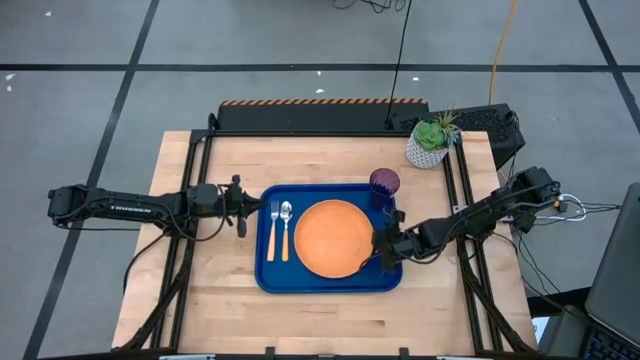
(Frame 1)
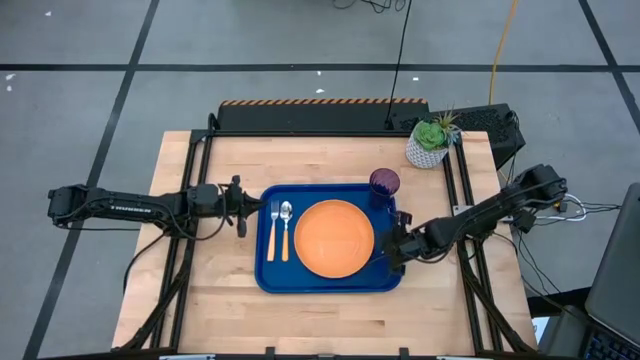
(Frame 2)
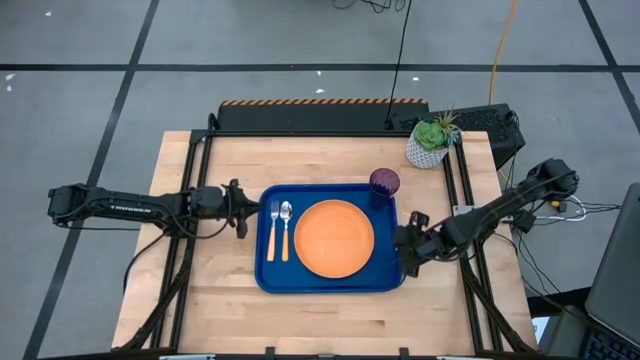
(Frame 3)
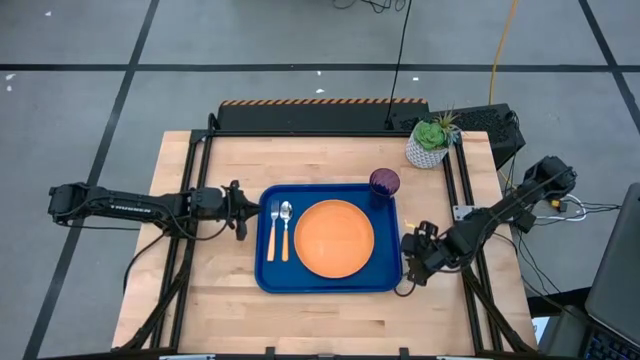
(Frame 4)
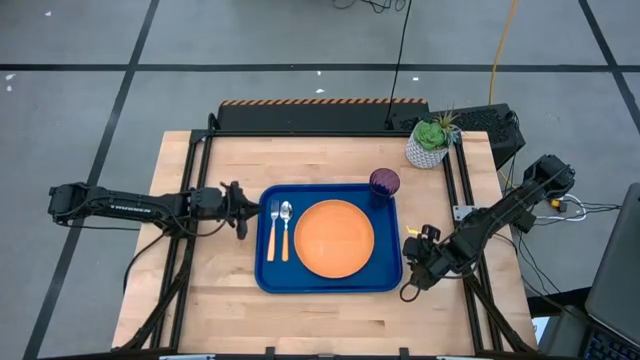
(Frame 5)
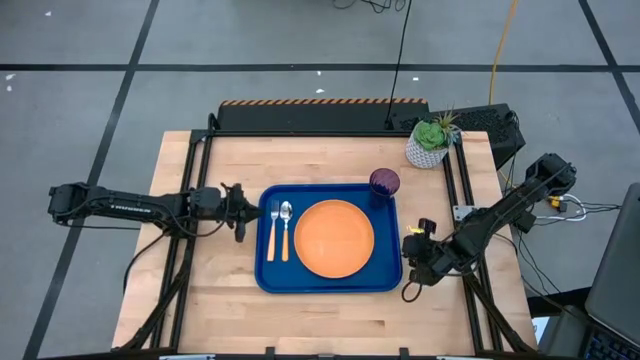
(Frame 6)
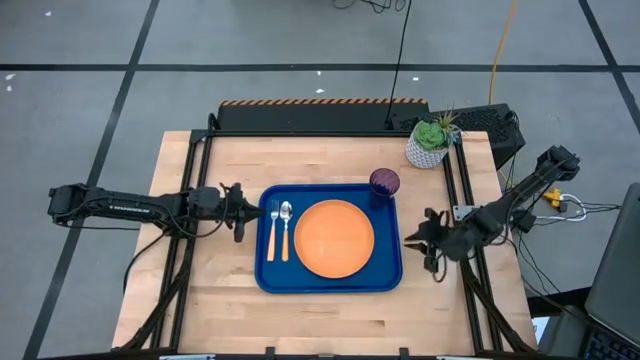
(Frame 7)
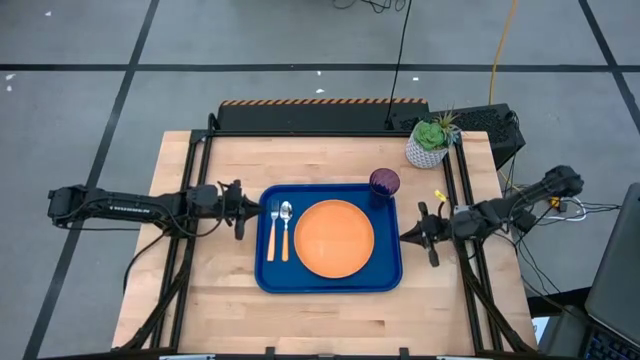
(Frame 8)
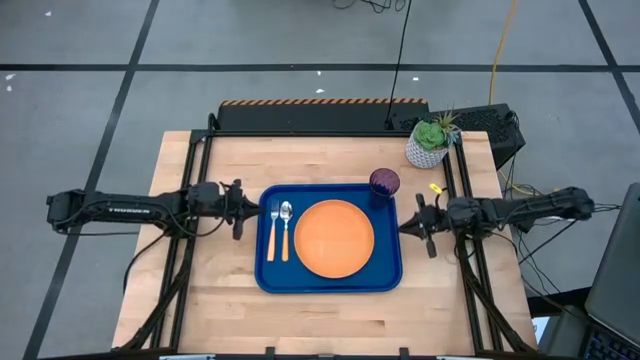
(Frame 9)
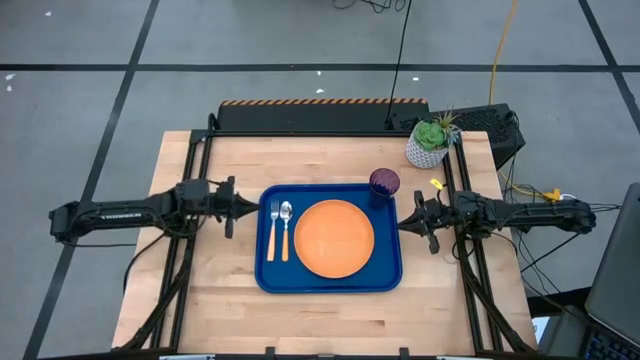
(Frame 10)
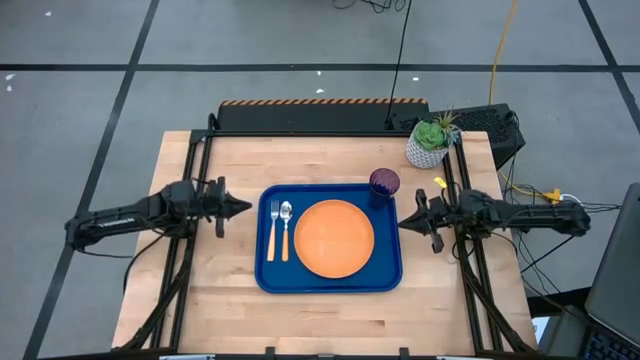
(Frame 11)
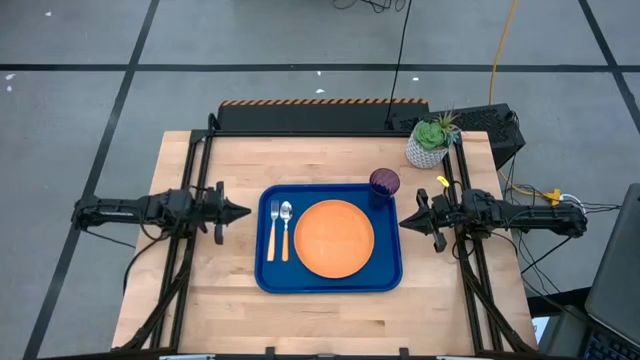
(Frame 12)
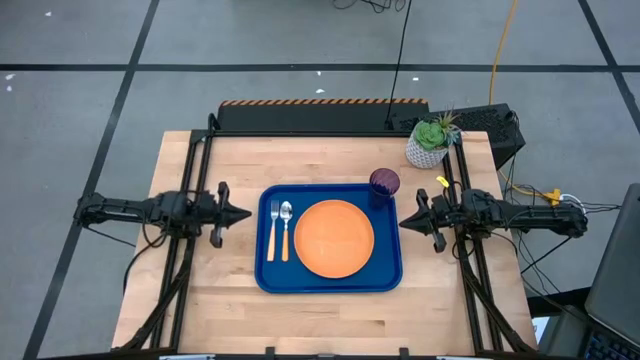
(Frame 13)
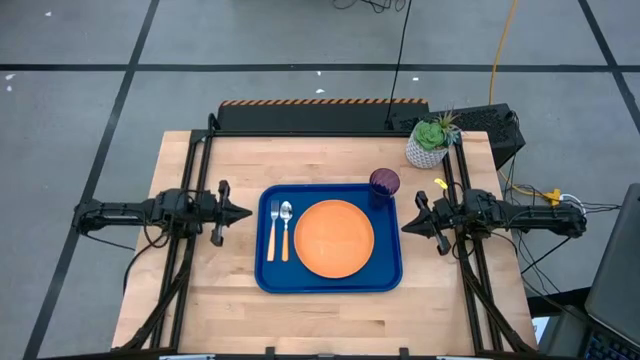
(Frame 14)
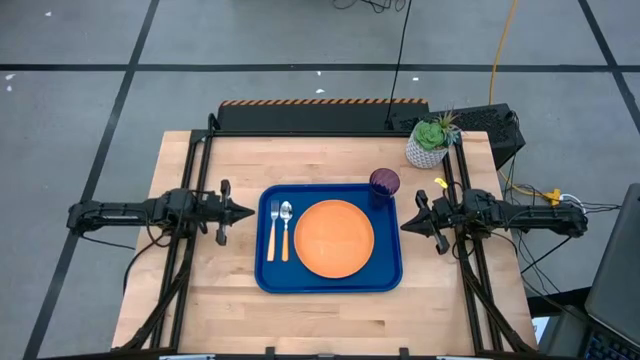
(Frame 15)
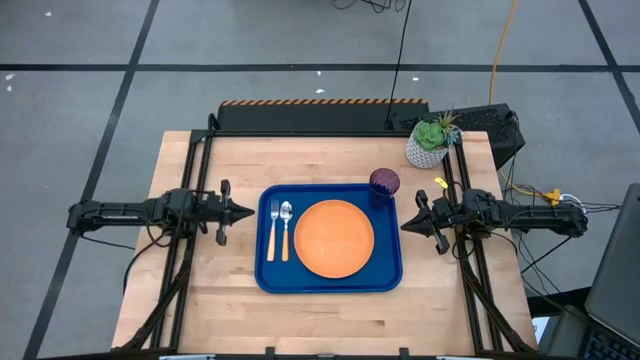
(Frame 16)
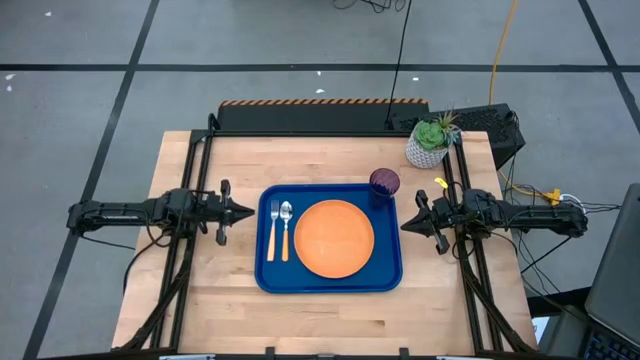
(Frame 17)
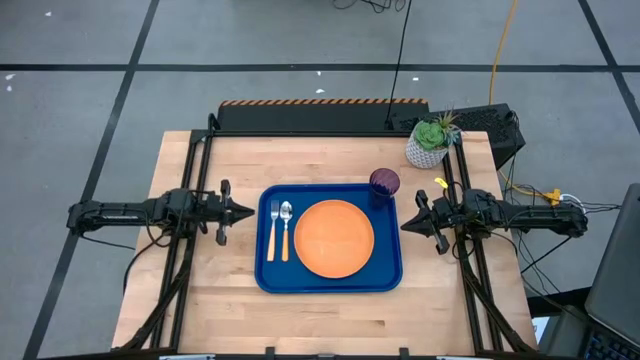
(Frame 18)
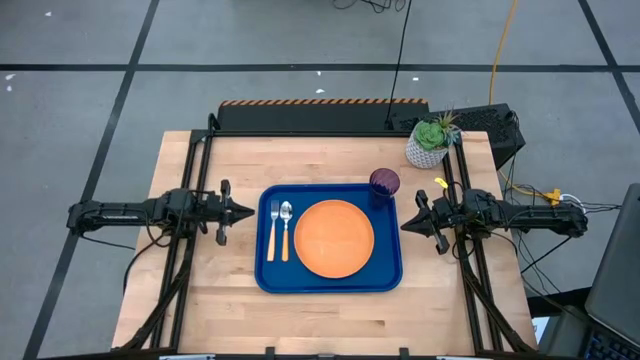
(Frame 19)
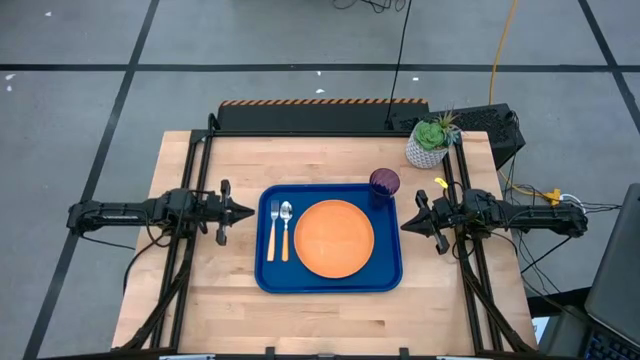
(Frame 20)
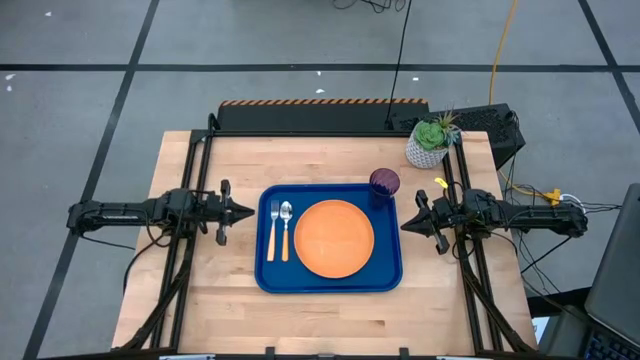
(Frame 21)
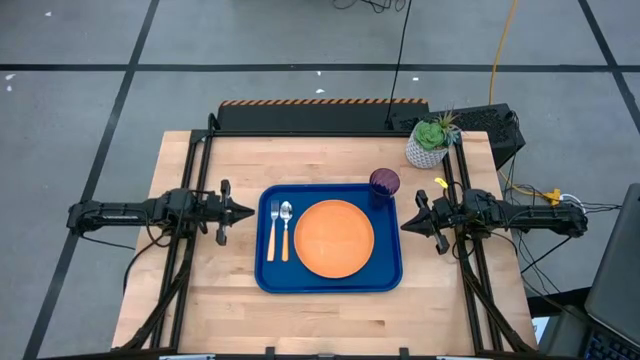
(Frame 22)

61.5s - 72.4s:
Task: Pick and place plate/cup/fork/spoon on tray
Return to Home Position

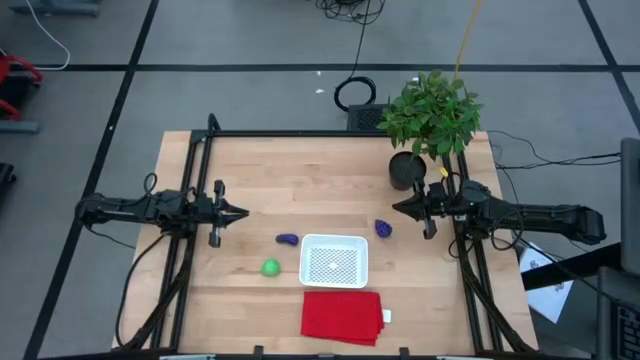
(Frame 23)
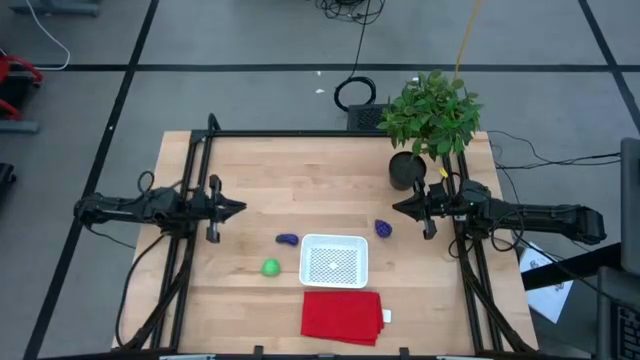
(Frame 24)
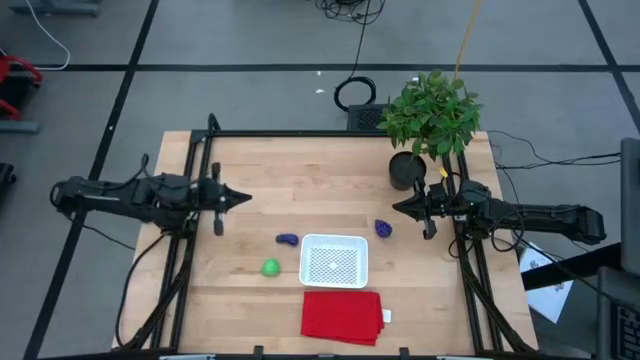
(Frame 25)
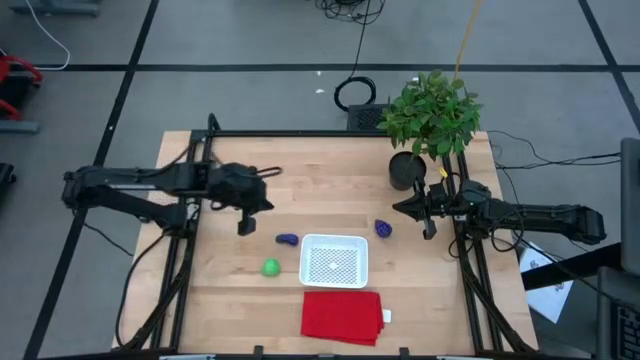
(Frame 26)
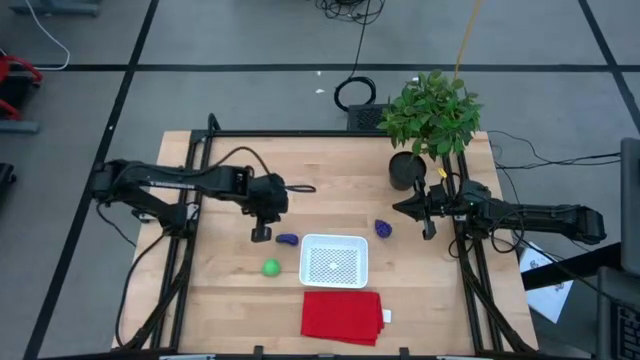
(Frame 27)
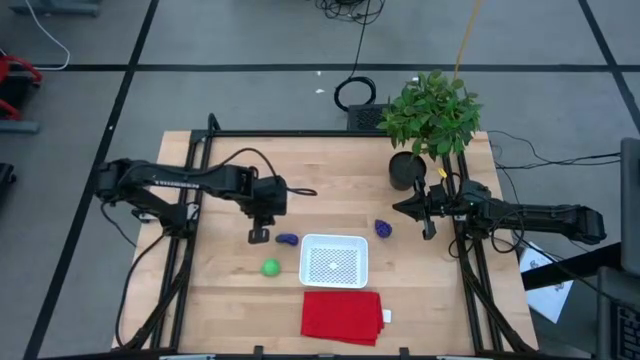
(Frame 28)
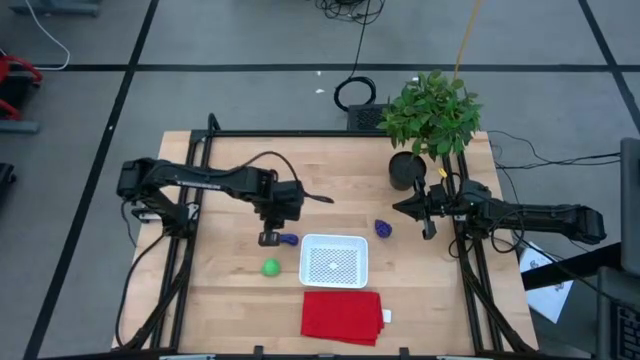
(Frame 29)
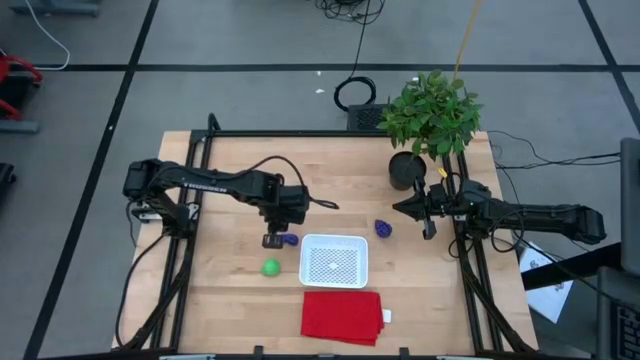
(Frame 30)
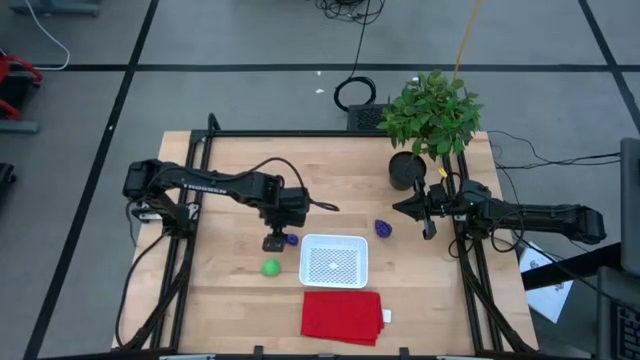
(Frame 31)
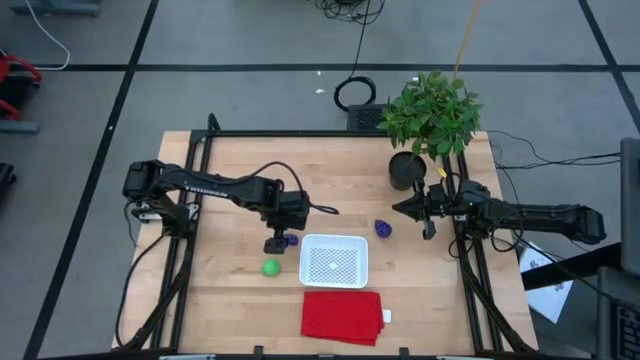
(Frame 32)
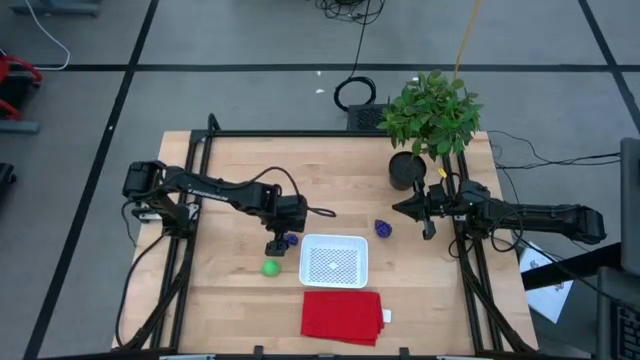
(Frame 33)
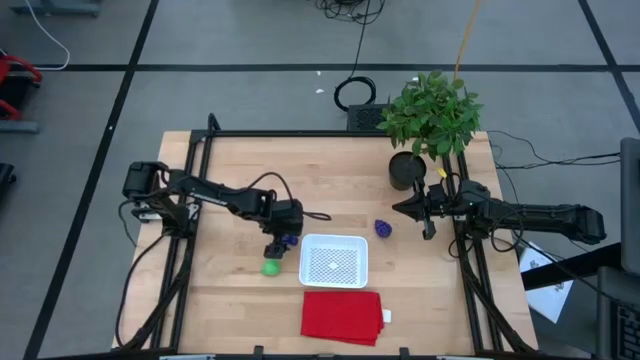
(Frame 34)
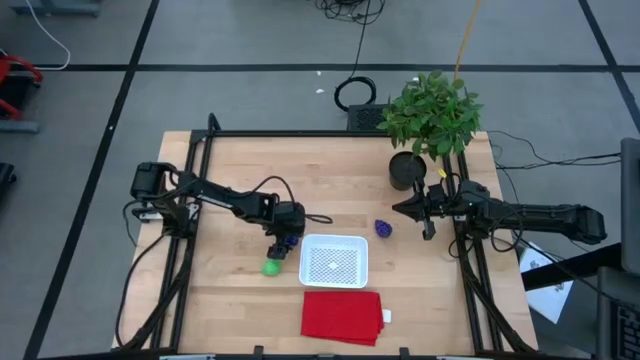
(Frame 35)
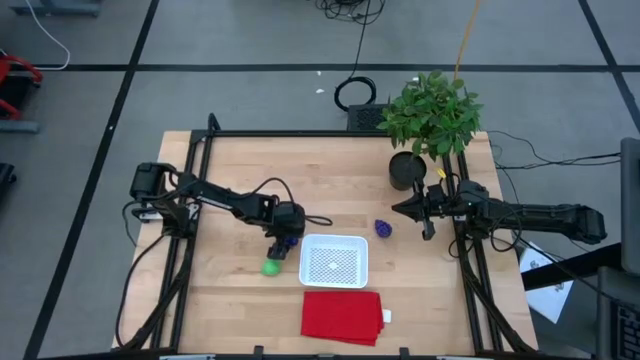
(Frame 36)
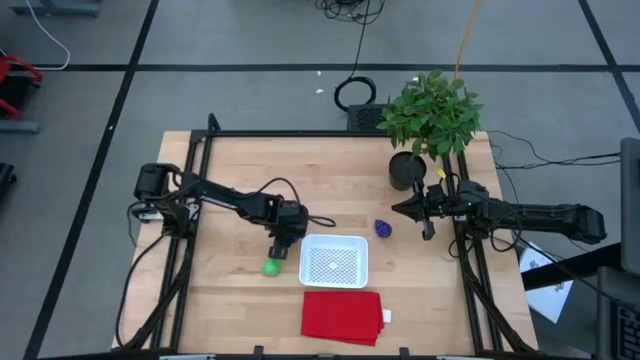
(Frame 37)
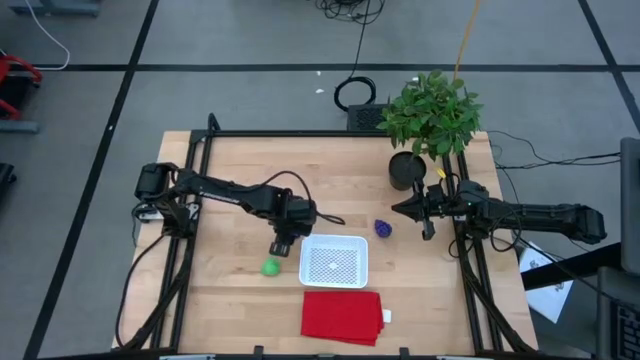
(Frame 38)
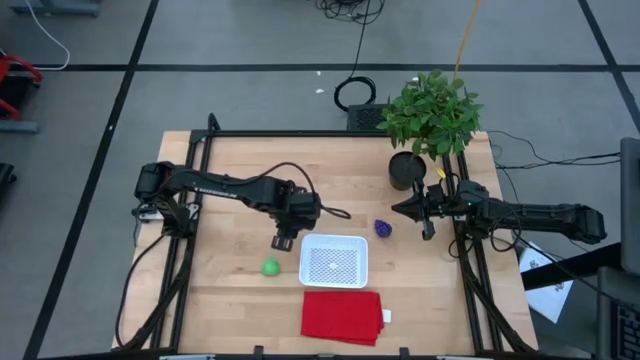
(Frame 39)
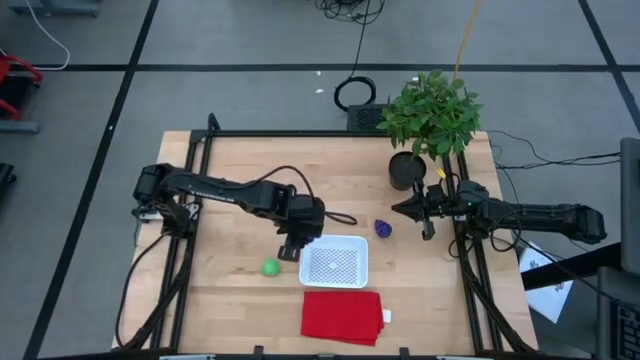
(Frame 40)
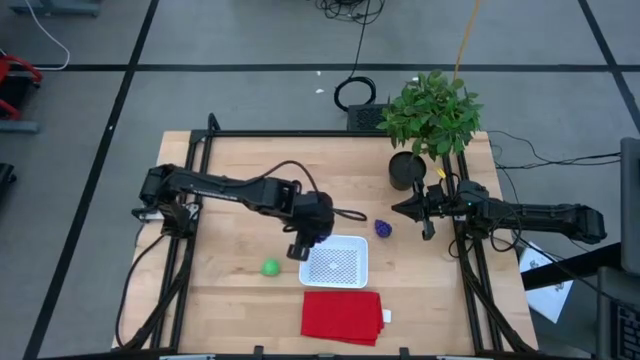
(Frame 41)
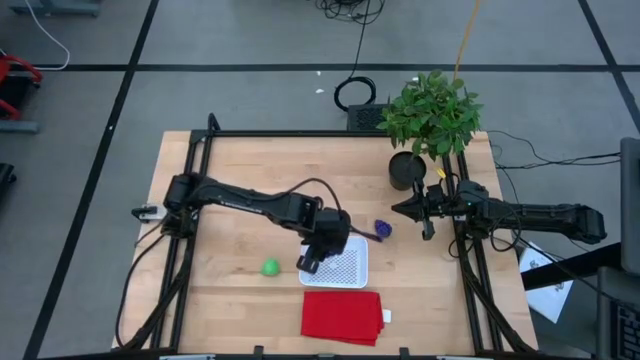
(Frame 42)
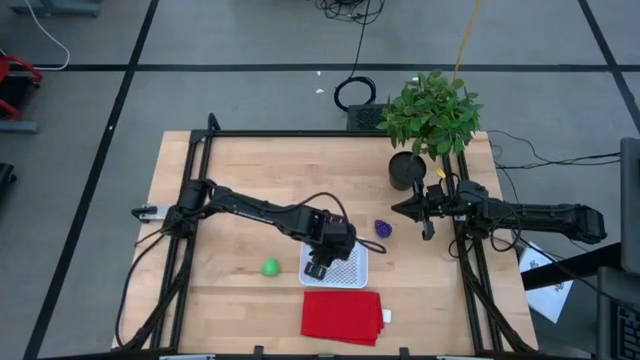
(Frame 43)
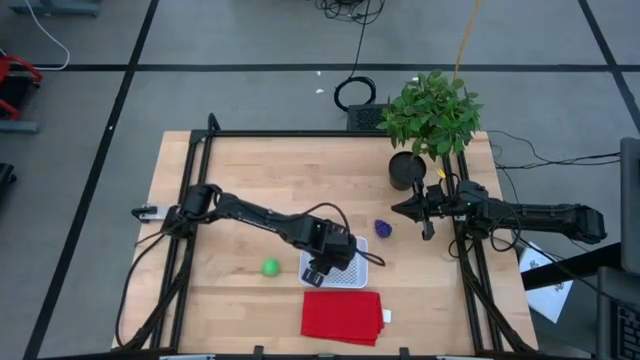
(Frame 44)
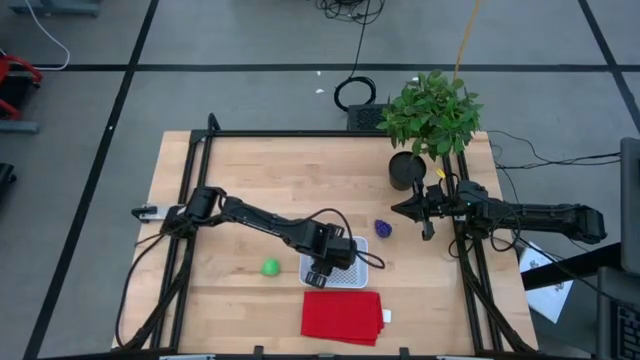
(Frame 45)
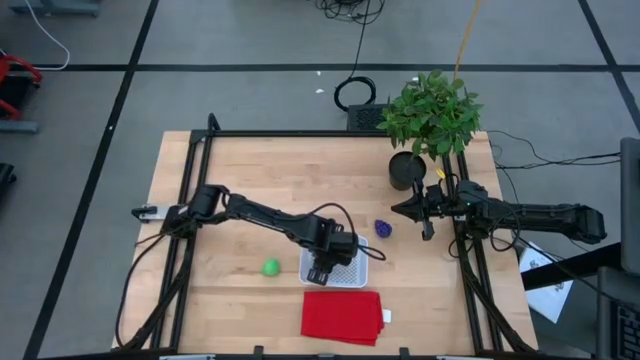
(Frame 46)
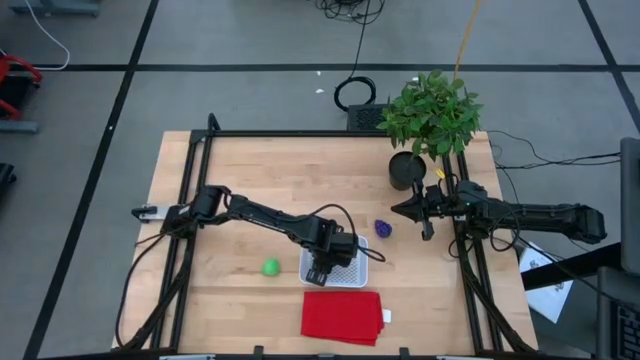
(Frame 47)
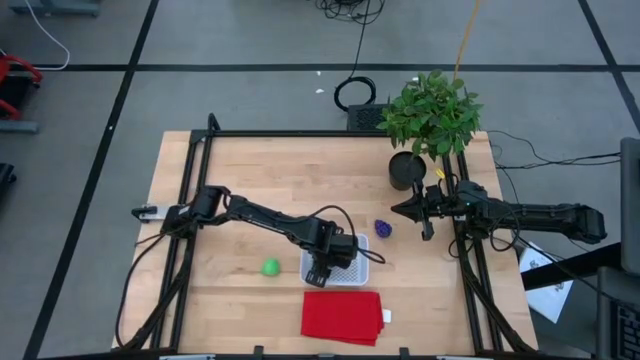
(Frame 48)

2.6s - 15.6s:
Task: Pick and placing Produce into tupperware
Put the eggplant into the white basket
